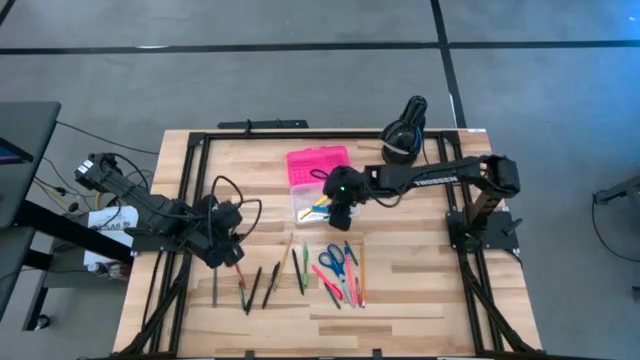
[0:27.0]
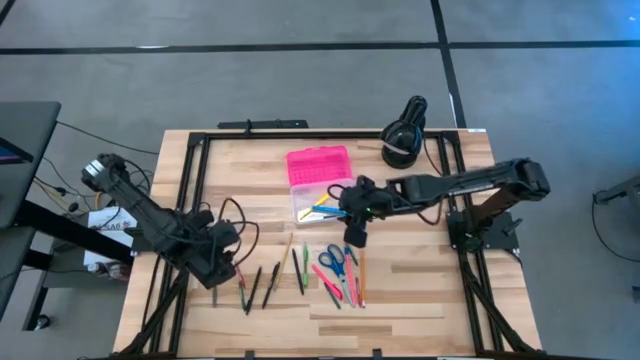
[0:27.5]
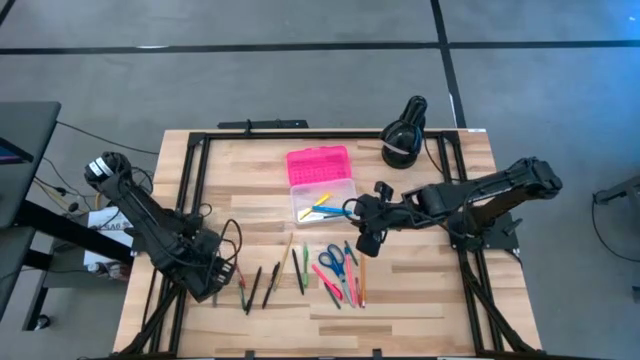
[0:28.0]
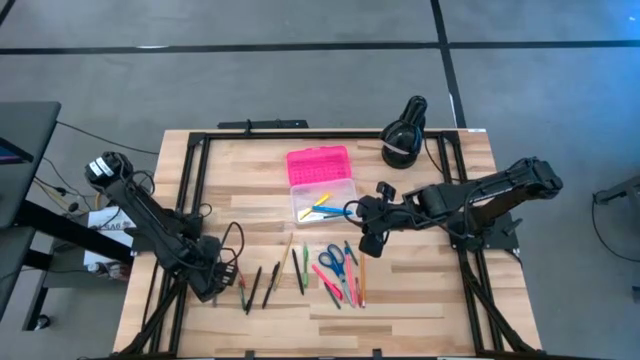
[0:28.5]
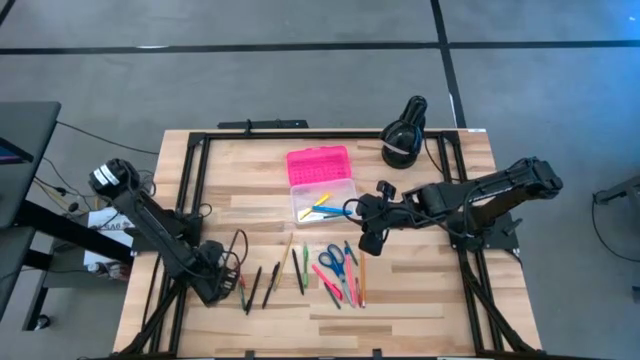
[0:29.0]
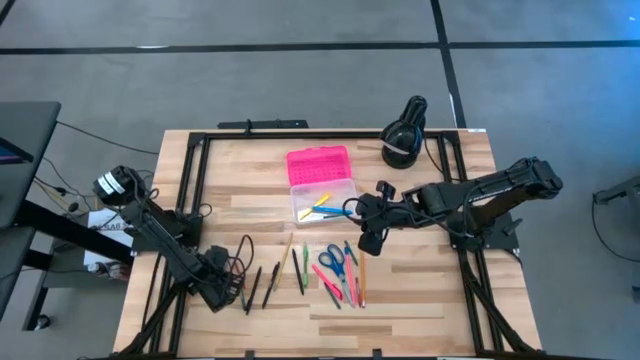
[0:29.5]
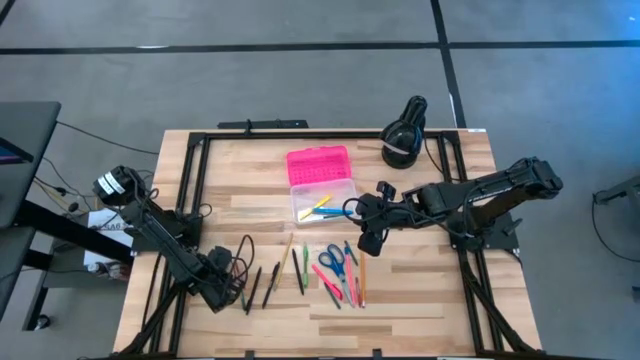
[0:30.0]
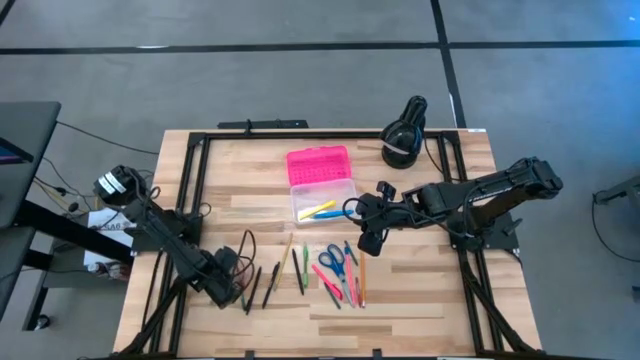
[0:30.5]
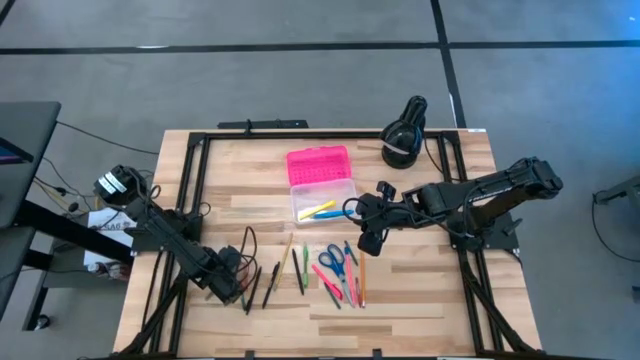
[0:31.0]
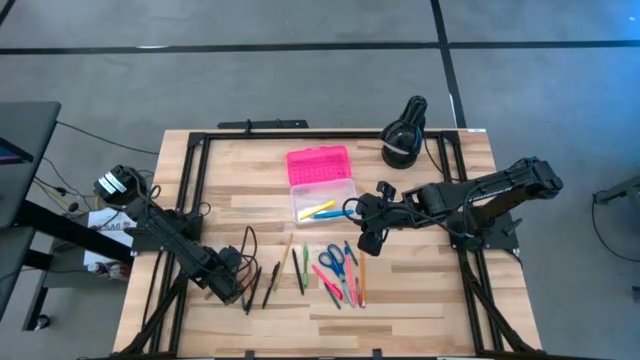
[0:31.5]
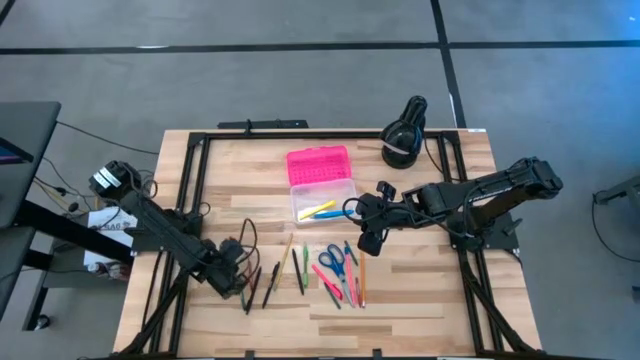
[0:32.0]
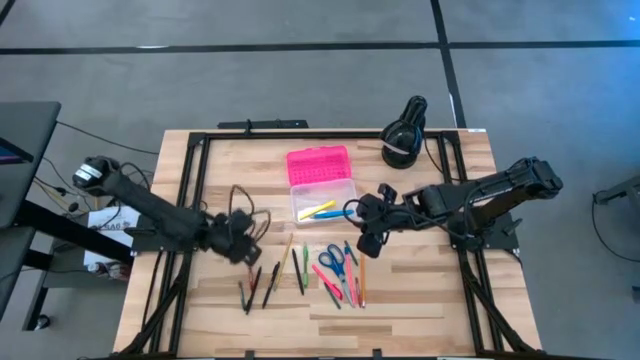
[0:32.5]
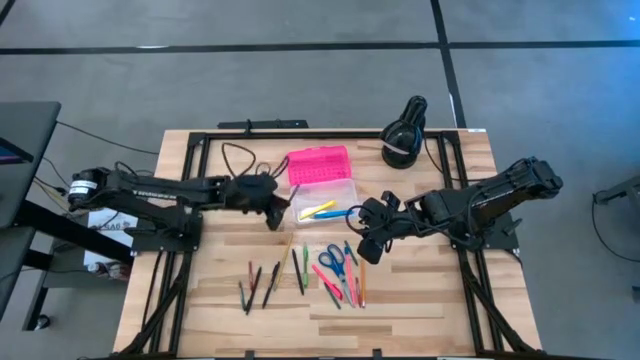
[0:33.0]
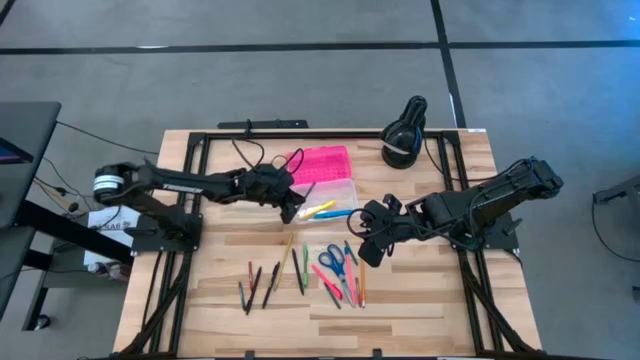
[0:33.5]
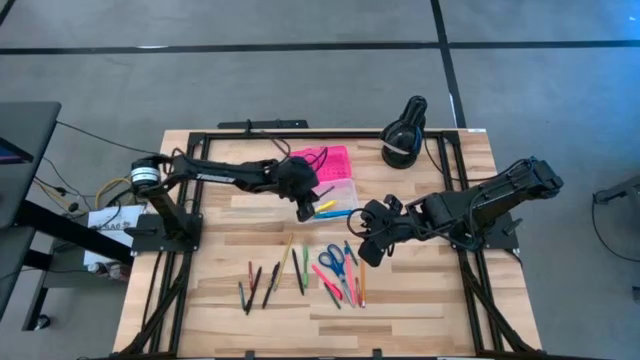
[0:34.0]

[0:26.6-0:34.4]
Task: Pick & place school supplies into a supply box
Put the transparent black pen into the pink supply box

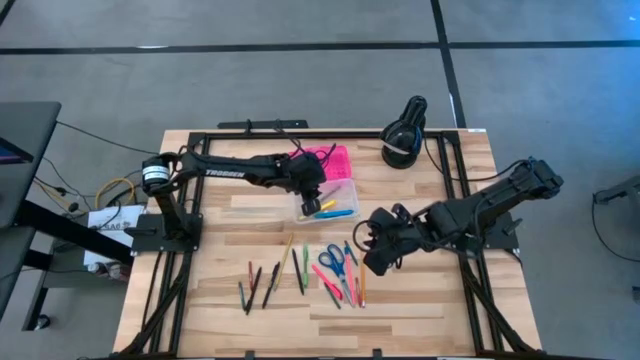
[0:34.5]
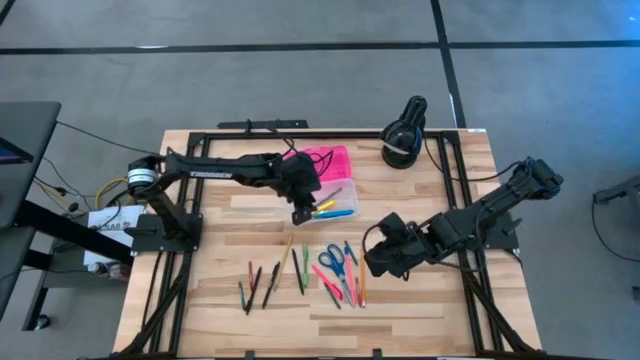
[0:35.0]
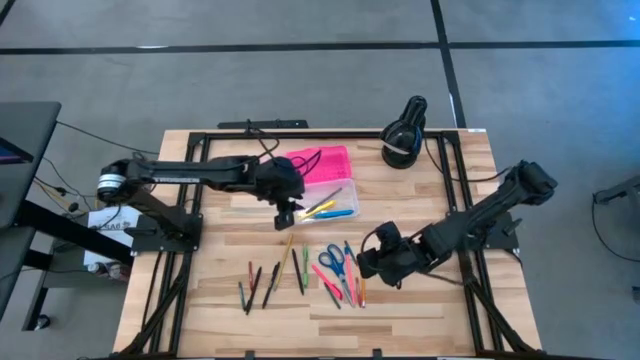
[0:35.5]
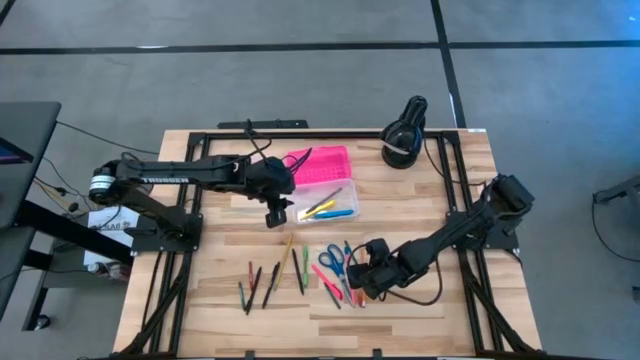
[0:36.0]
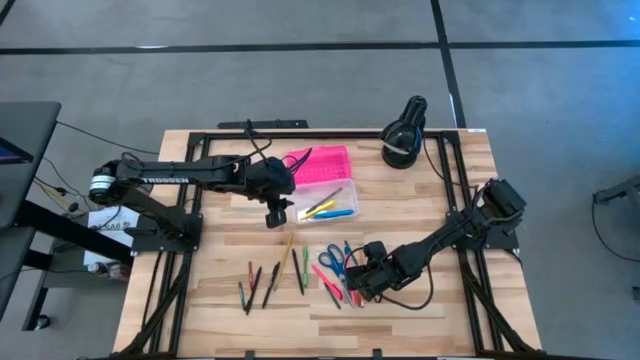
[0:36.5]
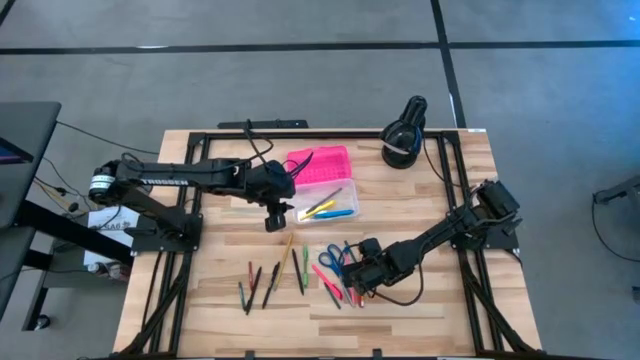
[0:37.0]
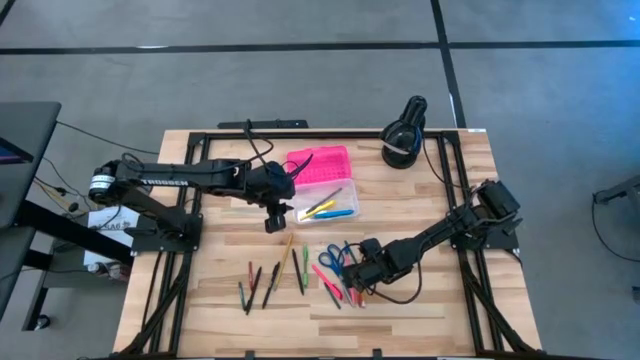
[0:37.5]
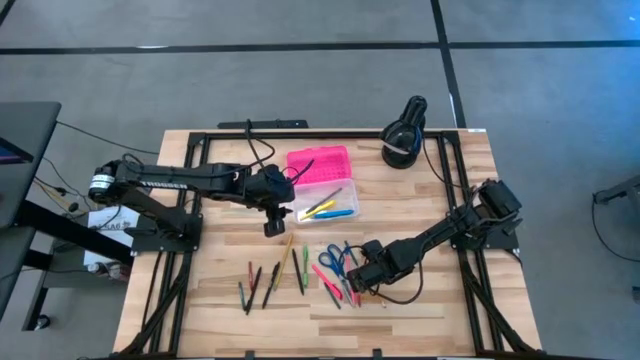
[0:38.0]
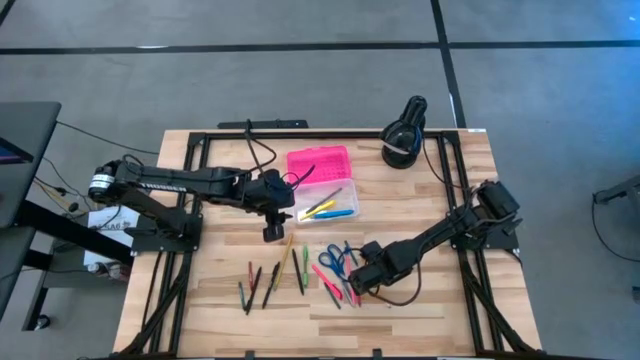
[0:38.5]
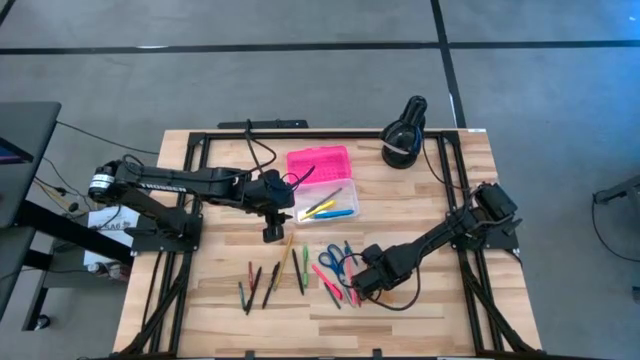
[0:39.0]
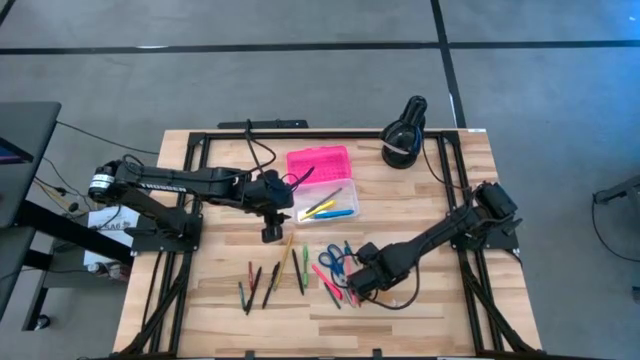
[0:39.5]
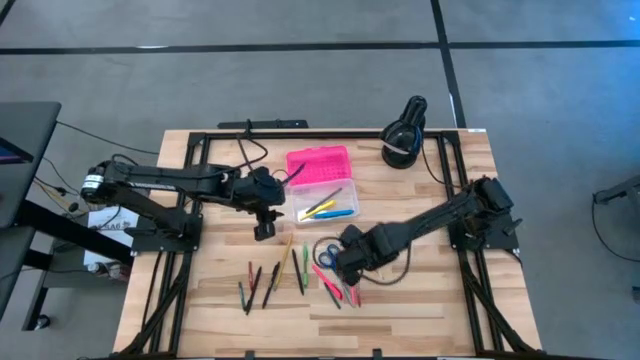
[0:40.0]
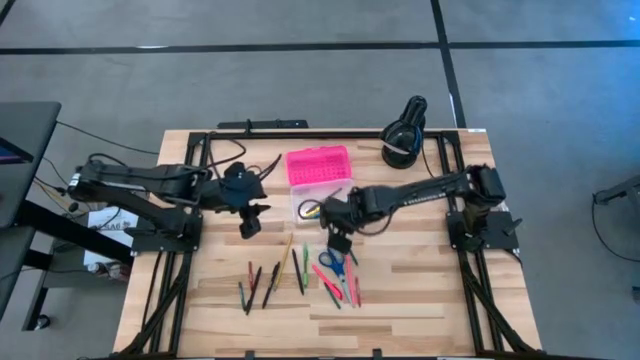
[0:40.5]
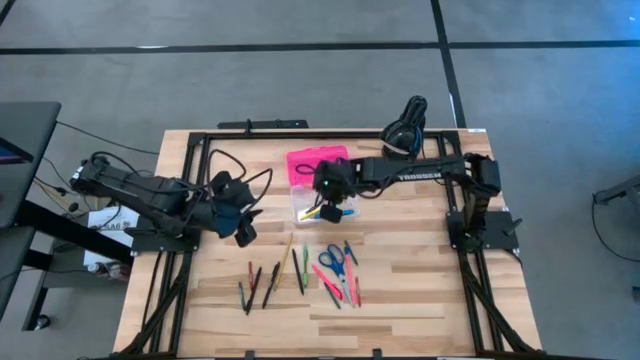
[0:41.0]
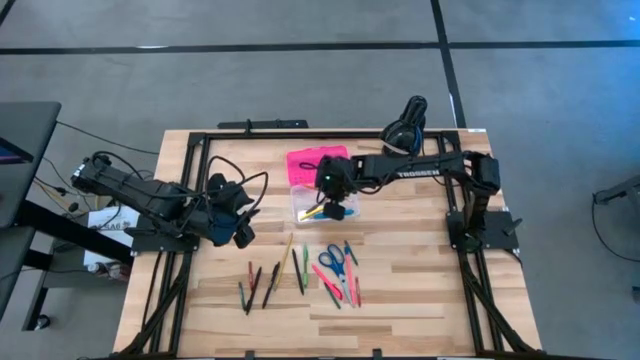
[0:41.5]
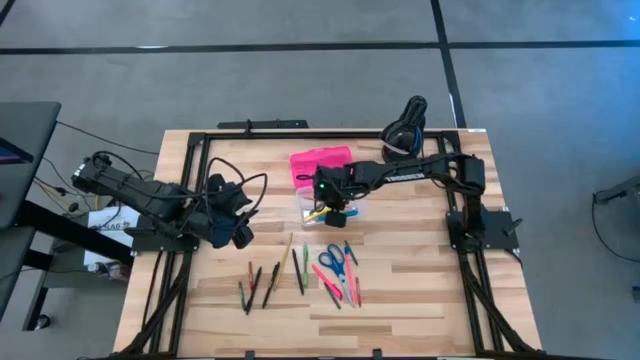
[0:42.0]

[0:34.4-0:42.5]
Put the orange pencil into the pink supply box

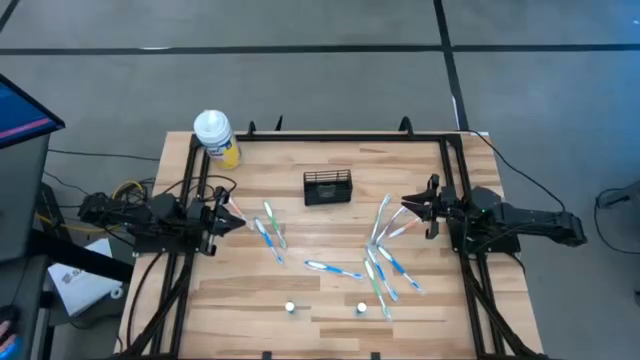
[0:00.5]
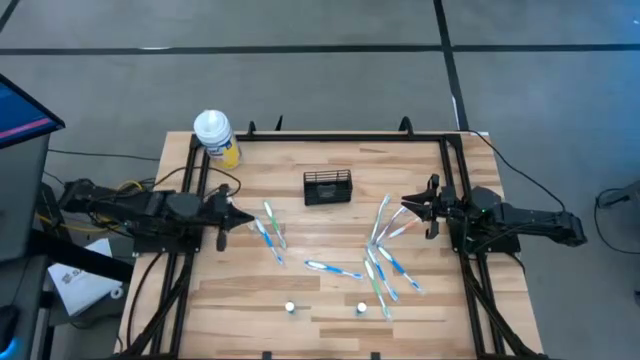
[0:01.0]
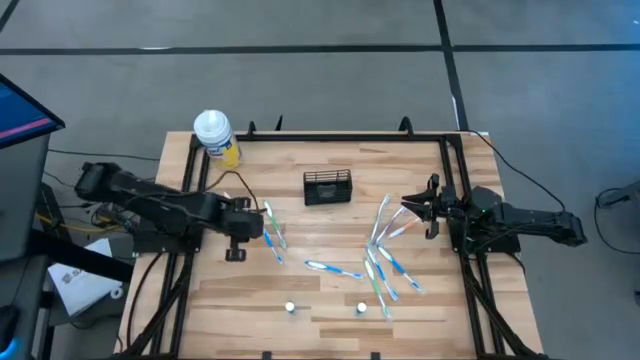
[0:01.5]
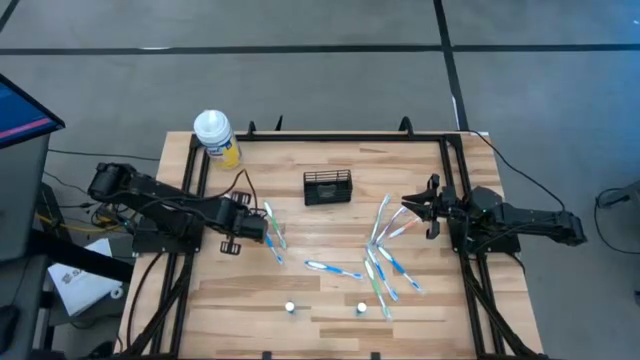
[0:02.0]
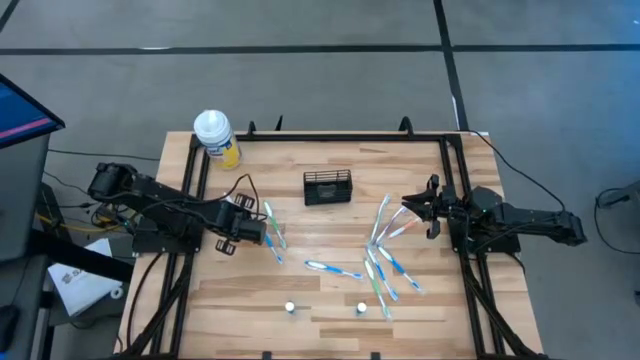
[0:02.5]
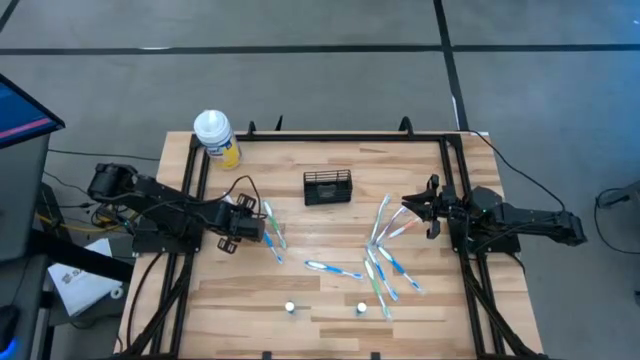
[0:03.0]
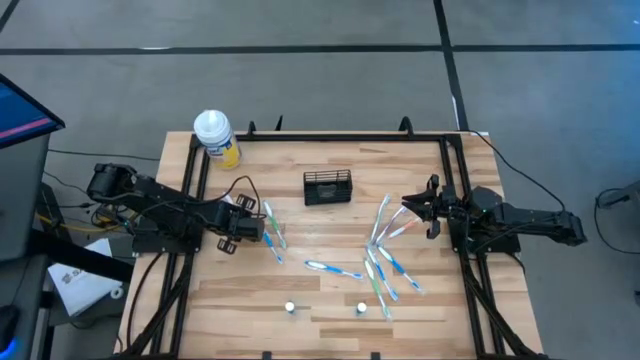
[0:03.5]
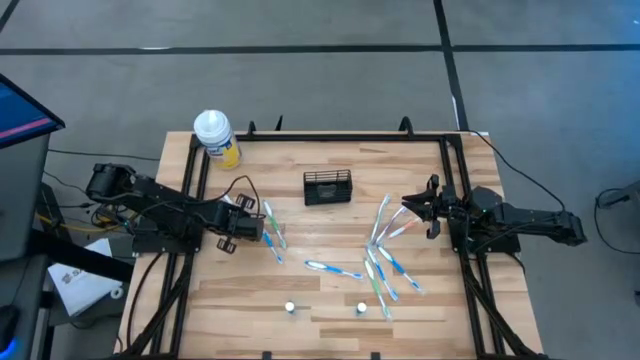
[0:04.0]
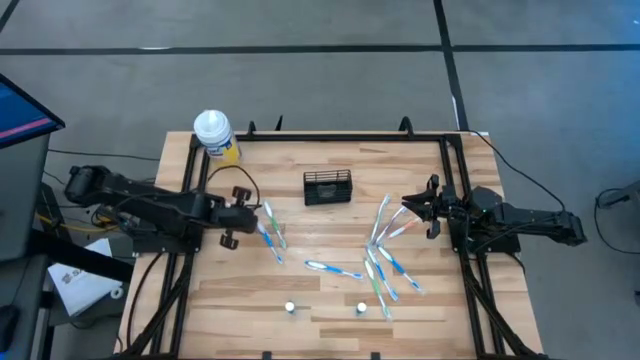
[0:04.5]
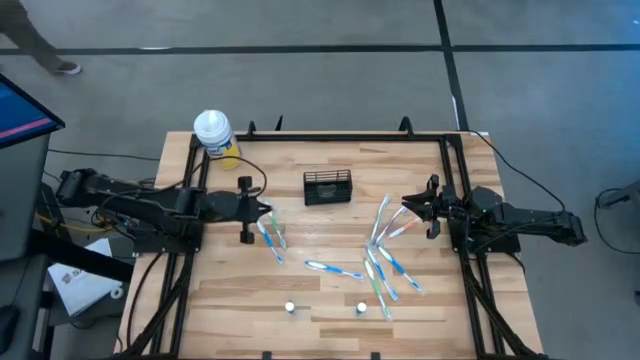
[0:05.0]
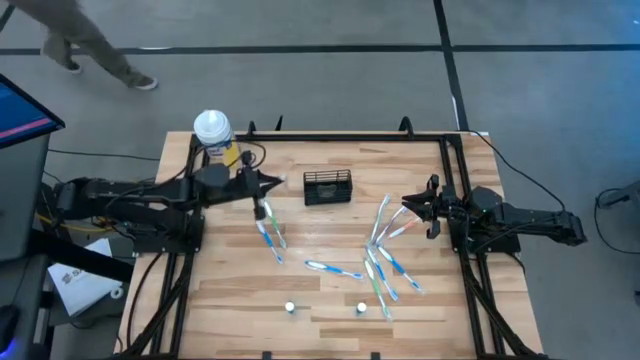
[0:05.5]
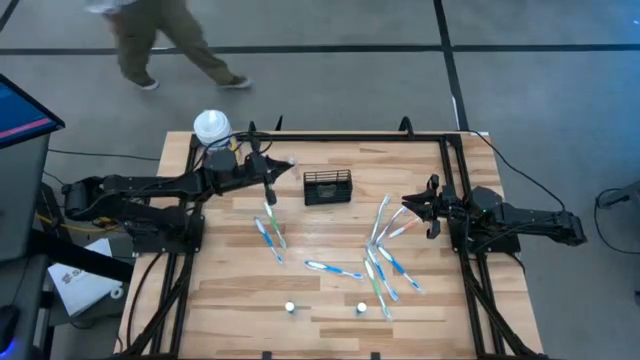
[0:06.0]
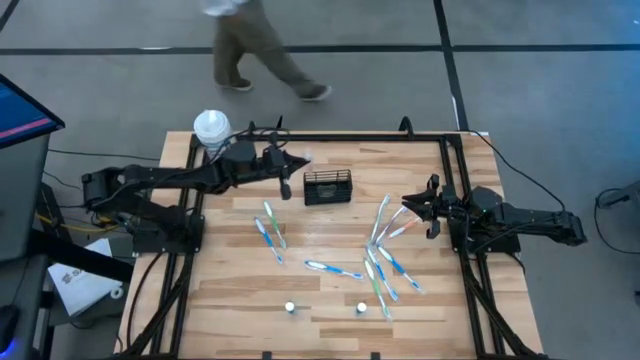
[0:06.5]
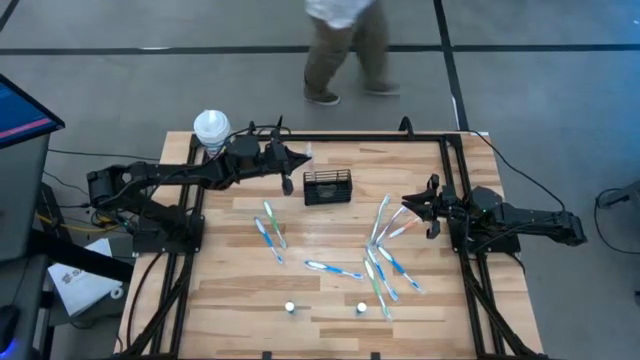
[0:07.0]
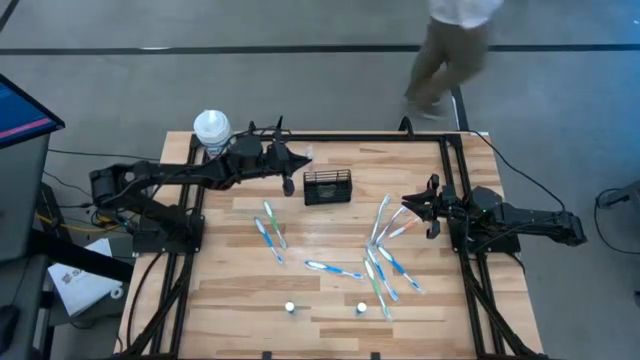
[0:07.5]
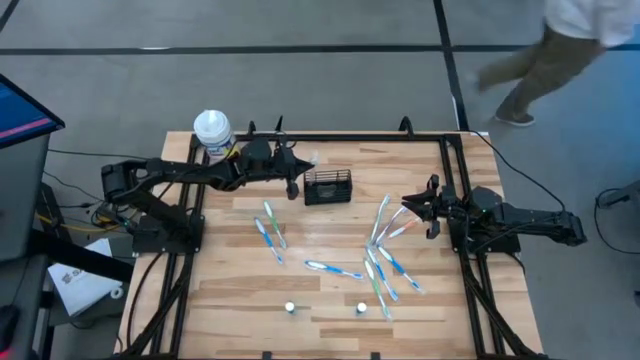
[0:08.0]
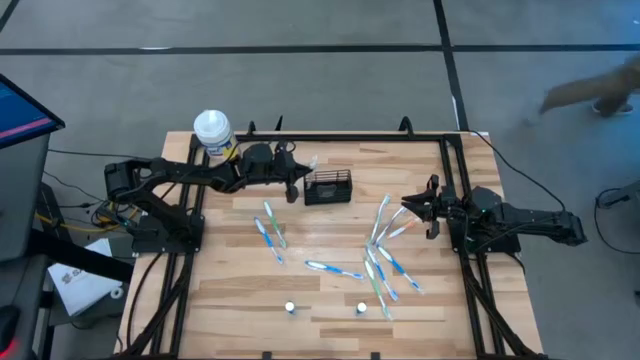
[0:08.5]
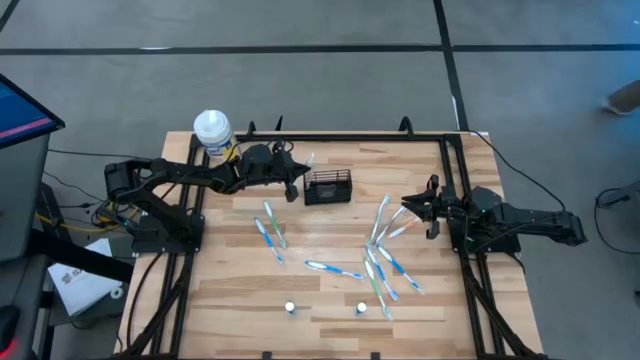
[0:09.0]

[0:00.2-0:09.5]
Task: Pick & Place toothbrushing station
Put the orange toothbrush into the black mesh organizer
